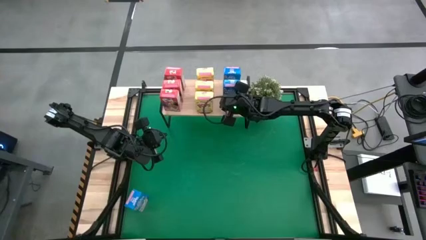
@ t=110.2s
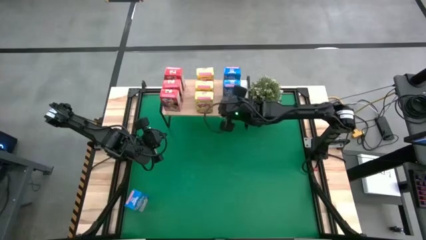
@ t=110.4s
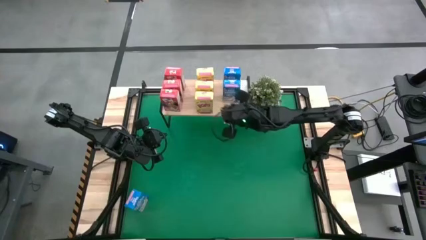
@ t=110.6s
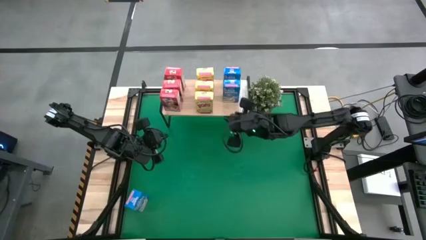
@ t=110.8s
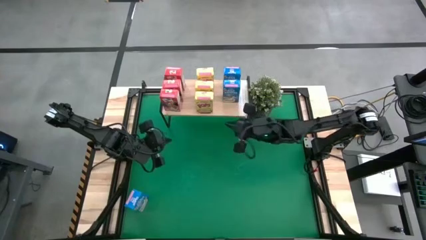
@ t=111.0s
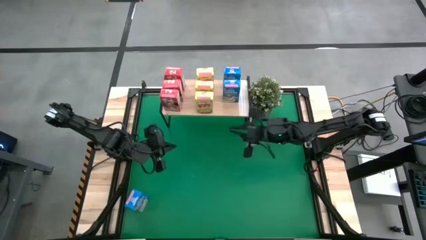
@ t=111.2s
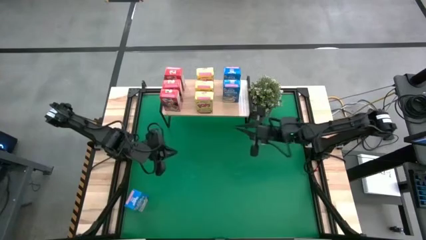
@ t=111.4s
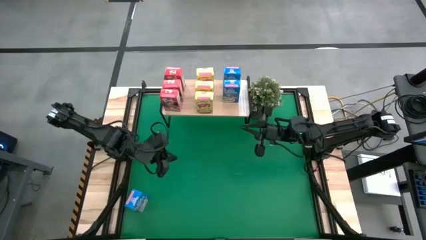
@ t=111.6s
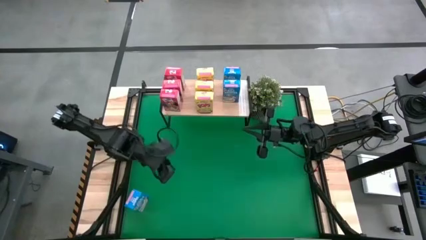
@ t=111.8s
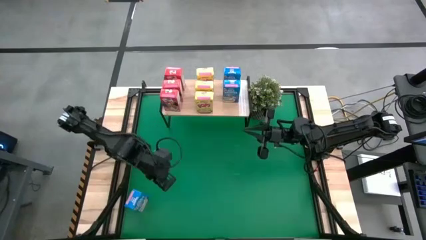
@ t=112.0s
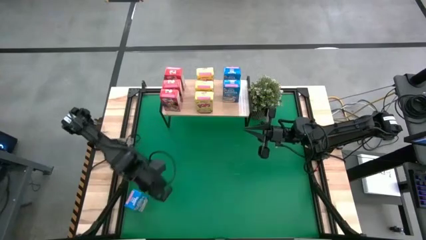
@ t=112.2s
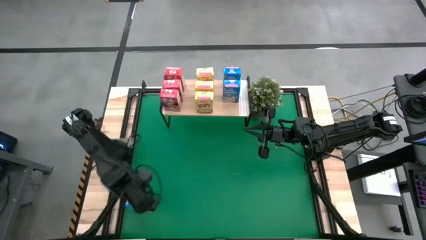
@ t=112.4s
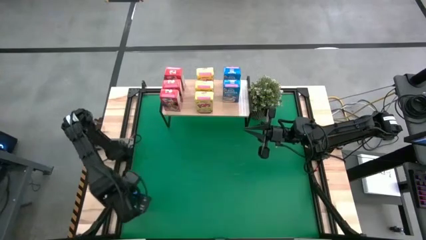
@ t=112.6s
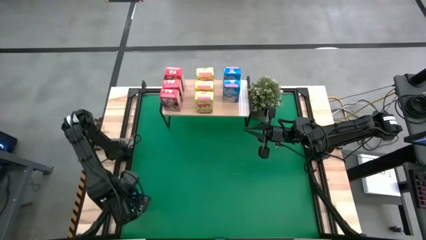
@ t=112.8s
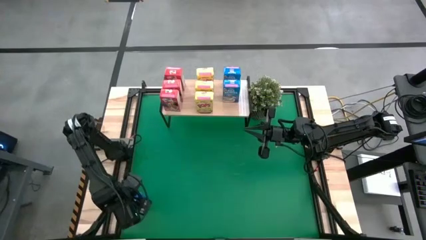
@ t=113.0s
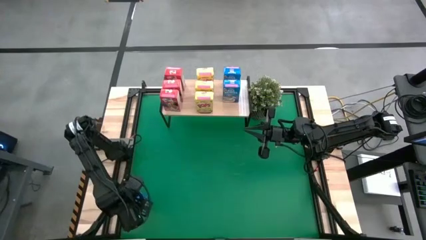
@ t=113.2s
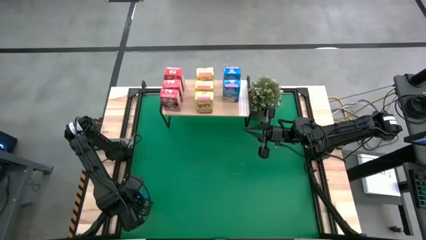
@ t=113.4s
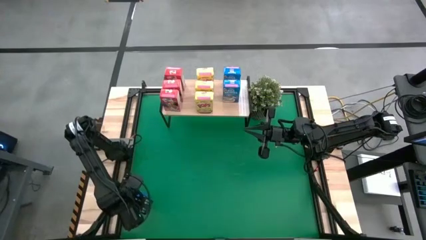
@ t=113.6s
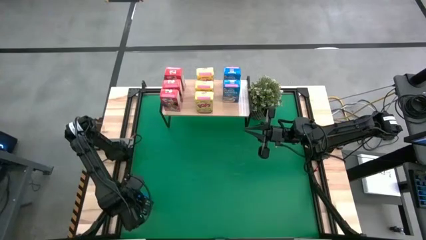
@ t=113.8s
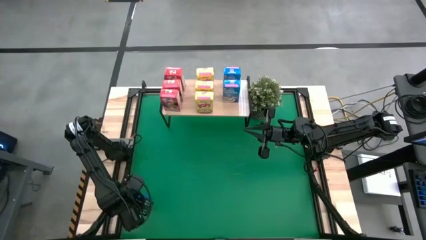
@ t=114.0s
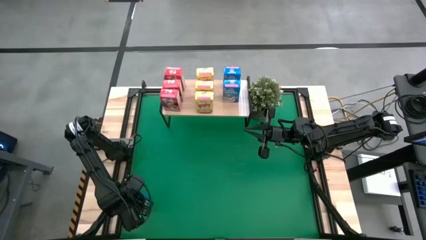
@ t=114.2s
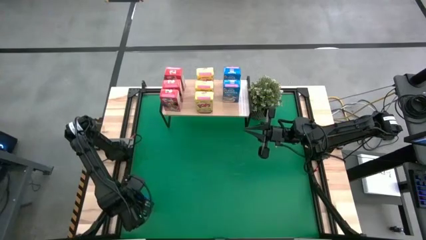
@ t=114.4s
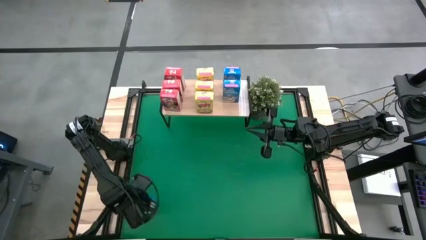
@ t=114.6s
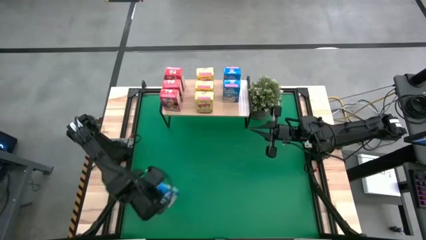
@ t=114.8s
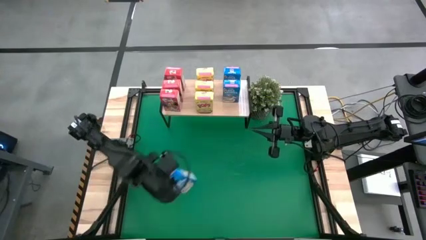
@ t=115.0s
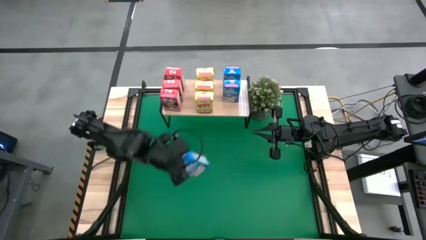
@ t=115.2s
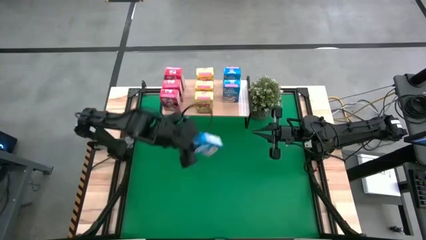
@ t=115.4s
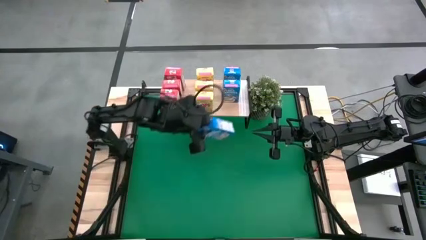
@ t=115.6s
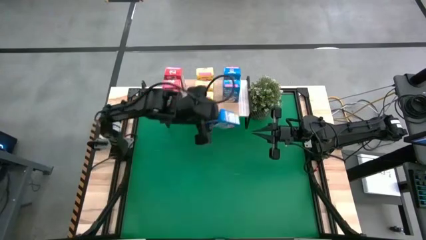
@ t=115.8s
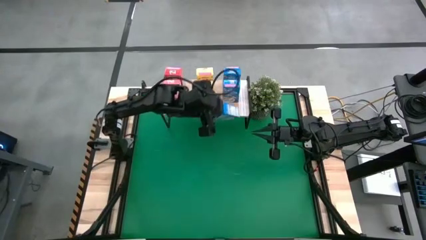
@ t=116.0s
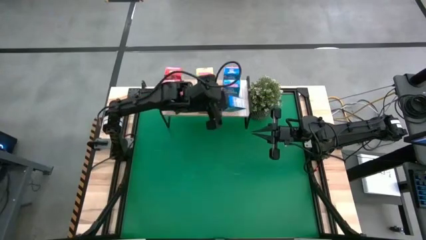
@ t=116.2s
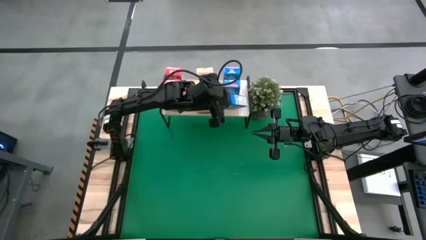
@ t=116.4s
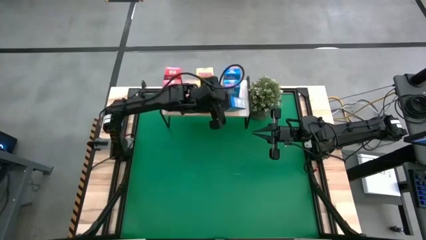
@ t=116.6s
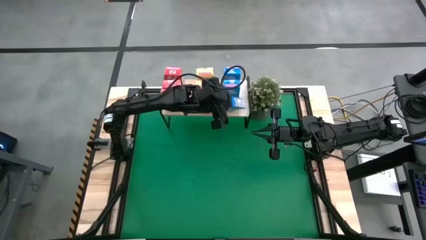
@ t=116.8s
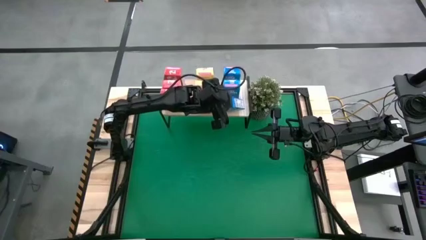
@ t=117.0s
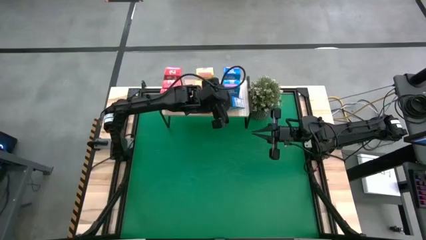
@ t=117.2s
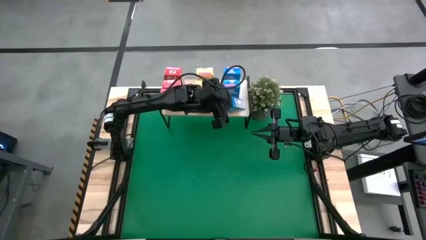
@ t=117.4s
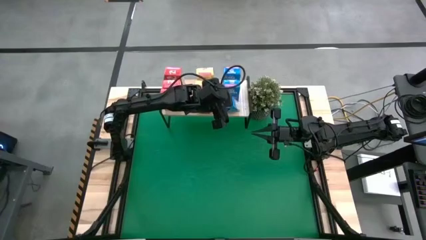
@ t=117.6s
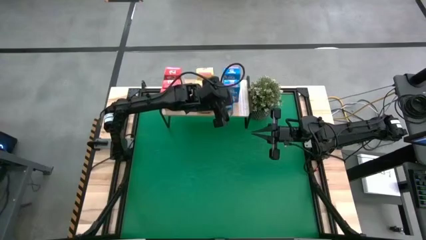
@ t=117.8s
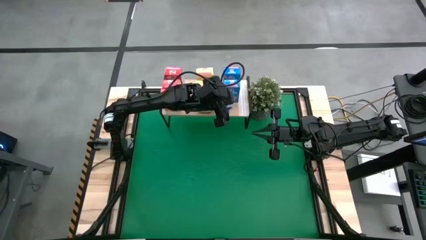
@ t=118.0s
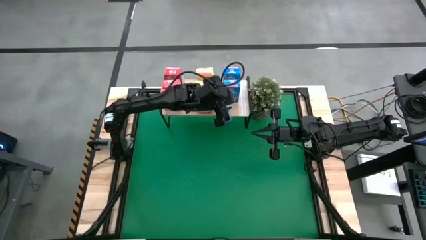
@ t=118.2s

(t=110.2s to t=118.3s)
Task: Stack cereal on shelf
Put the blue cereal box on the shelf aligned with the other blue cereal boxes

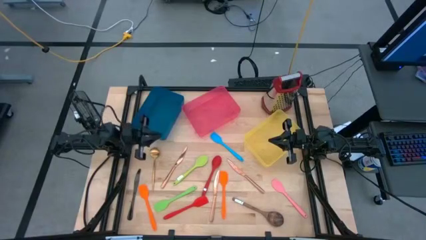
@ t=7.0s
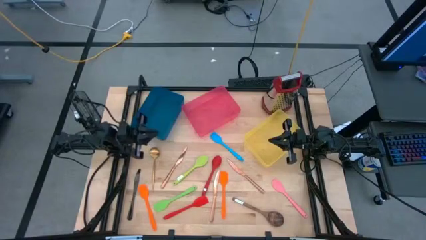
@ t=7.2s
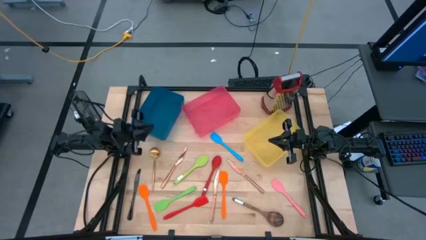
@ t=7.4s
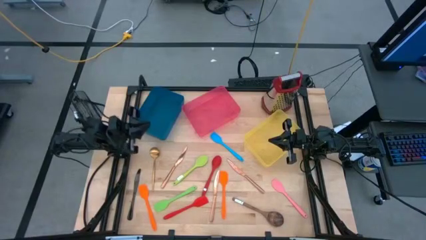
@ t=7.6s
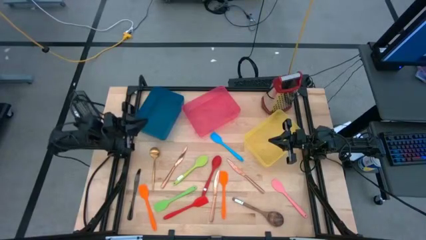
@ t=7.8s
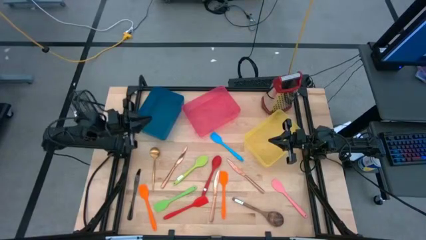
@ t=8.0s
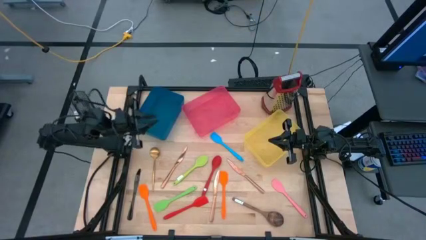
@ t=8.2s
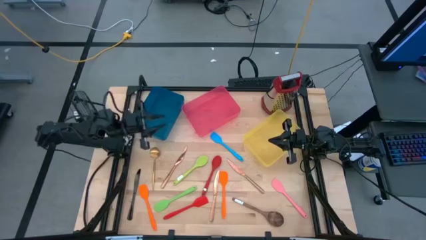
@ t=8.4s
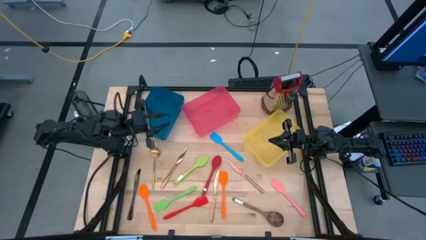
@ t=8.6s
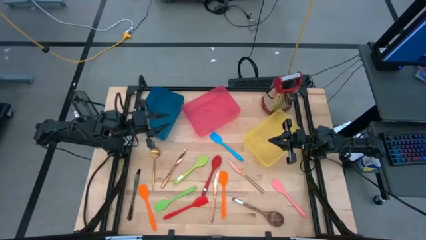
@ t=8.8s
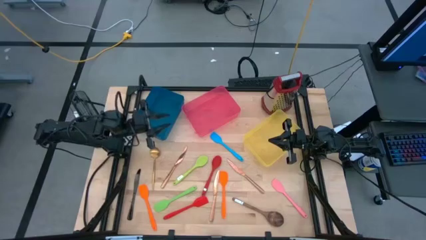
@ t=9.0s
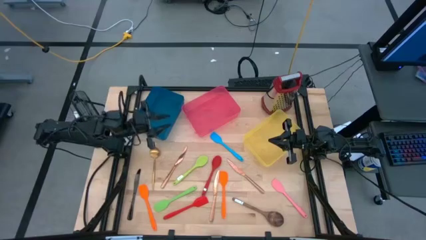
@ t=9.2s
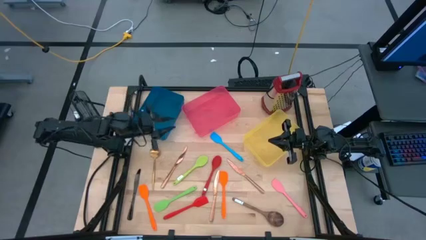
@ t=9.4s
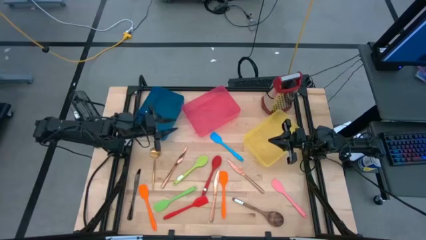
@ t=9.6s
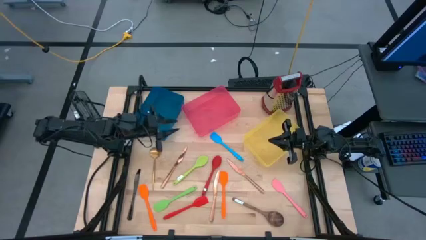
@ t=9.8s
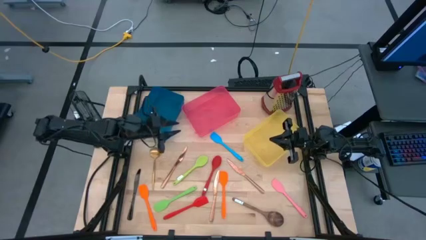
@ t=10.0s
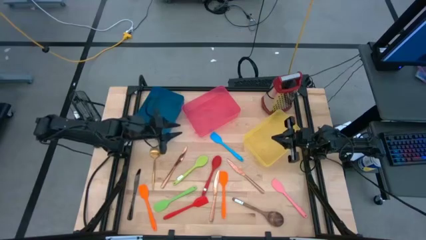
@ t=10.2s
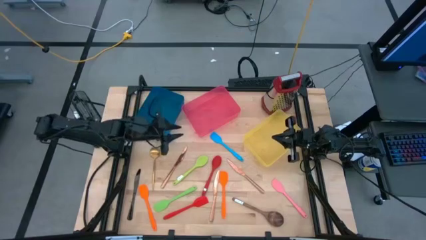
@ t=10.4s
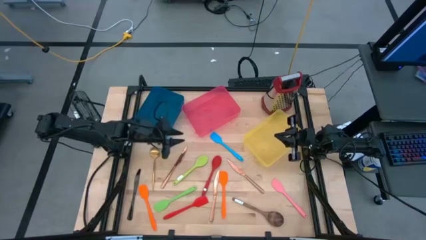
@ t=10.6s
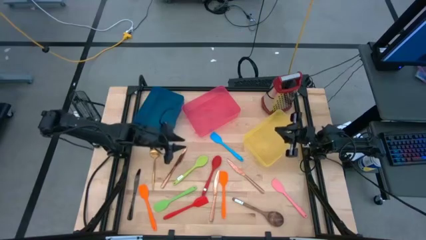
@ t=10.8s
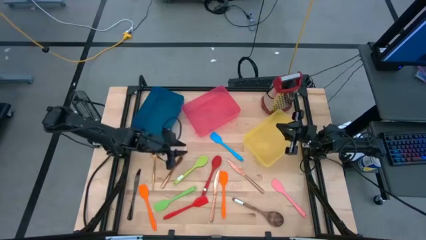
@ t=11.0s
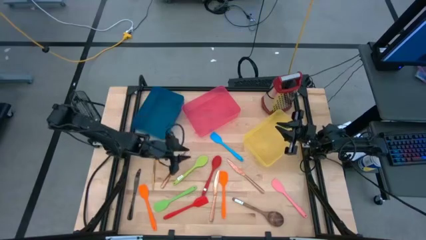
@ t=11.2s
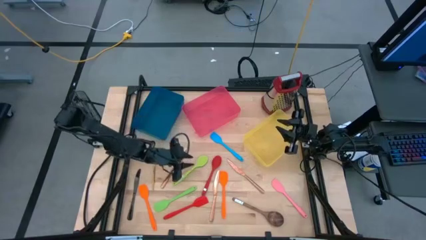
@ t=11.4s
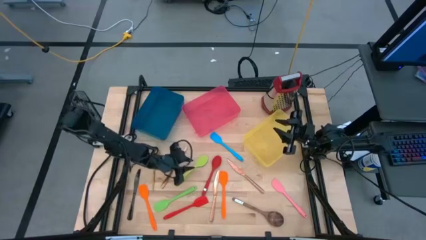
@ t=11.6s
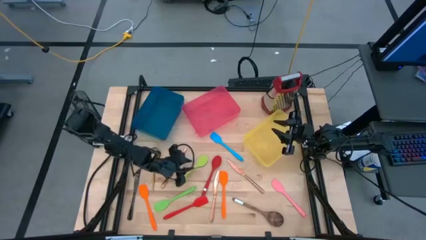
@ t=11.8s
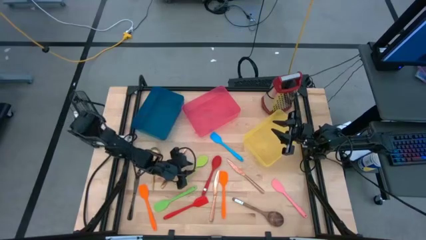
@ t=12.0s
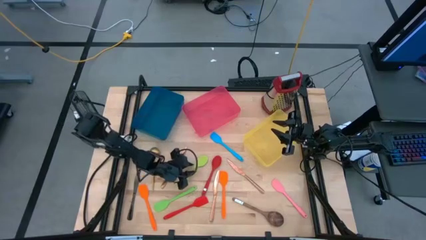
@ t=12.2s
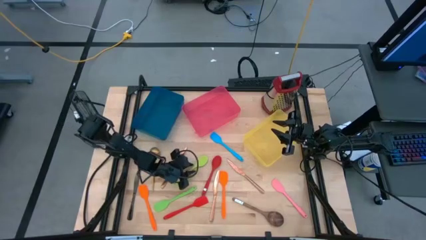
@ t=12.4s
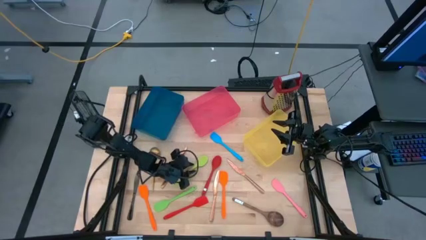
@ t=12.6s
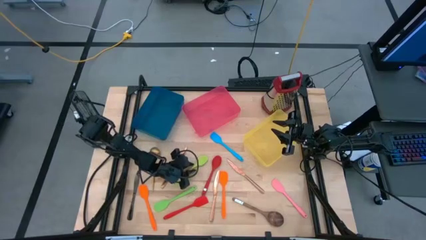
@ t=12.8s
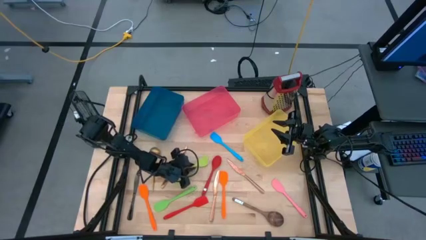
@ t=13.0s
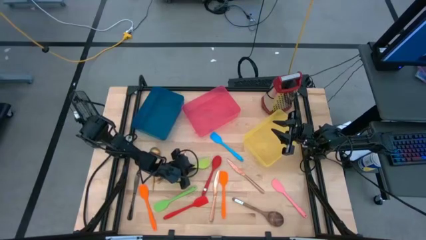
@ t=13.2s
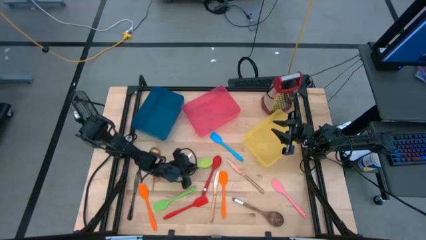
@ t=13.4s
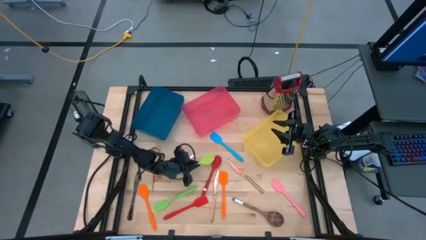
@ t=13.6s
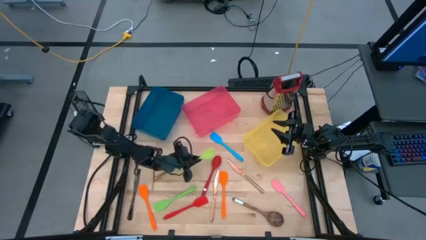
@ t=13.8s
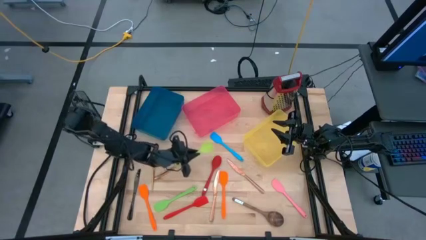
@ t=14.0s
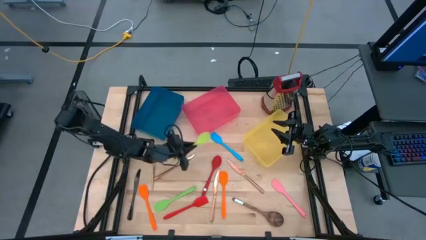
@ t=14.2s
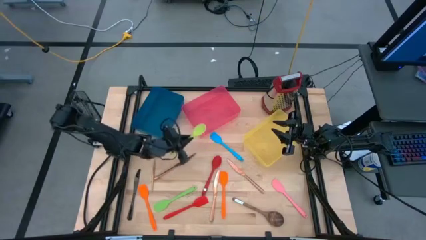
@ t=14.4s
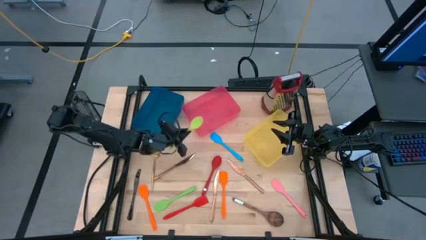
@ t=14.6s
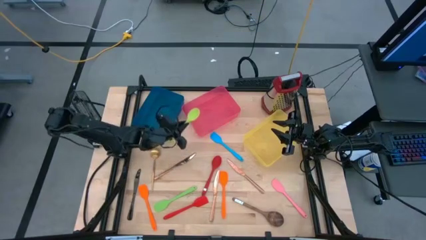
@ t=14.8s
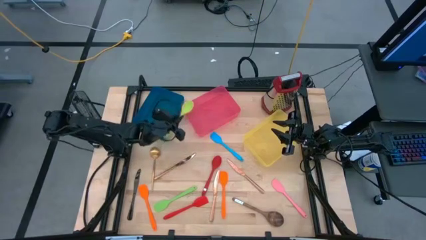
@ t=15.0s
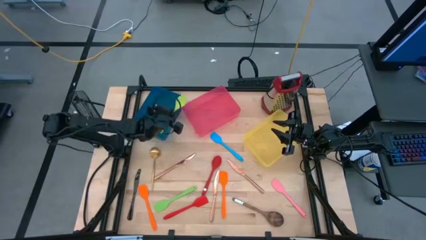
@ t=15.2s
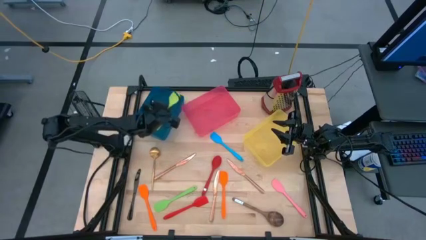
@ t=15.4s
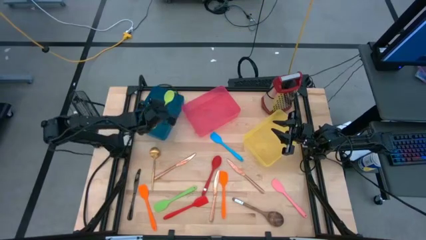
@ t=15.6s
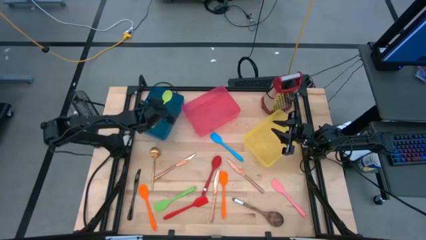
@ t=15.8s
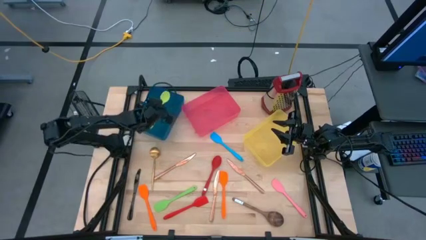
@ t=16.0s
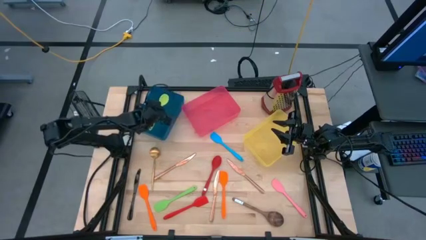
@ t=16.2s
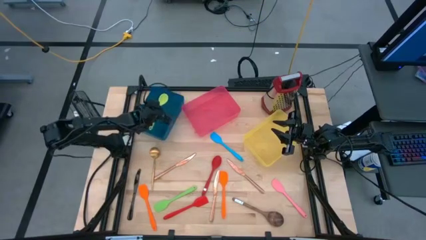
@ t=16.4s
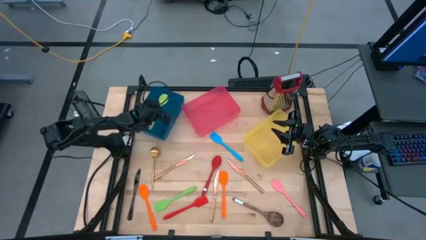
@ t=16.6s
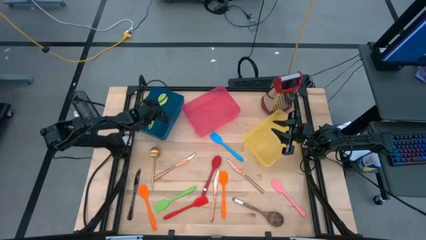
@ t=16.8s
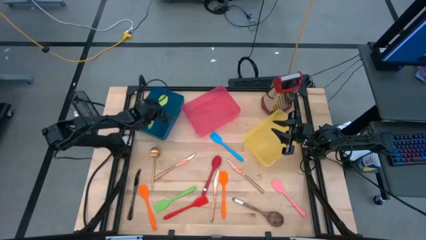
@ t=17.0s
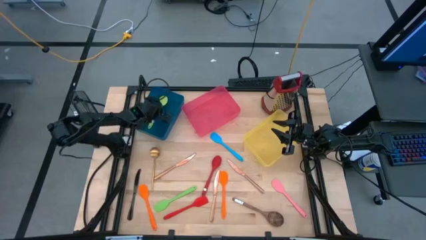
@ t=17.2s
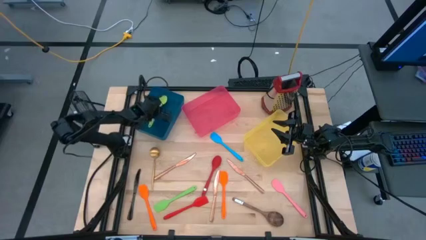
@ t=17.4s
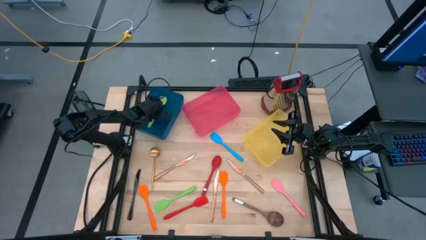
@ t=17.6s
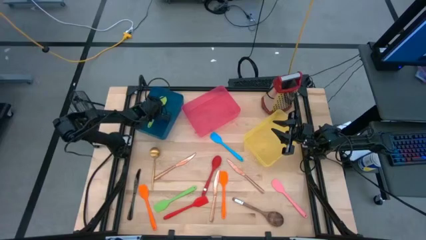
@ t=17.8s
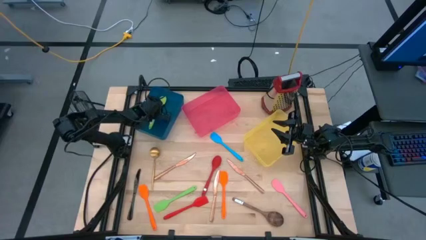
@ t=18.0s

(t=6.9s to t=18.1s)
Task: Pick & Place Kitchen Items
Put the green spoon into the blue bin
